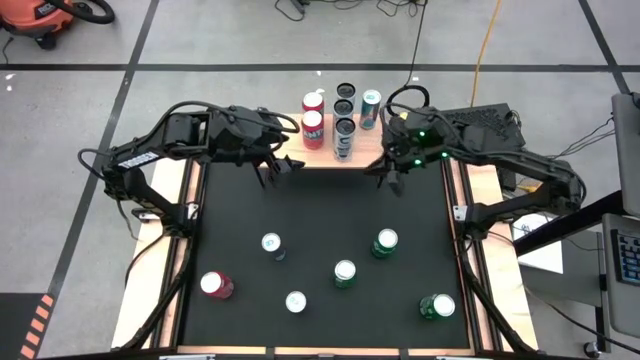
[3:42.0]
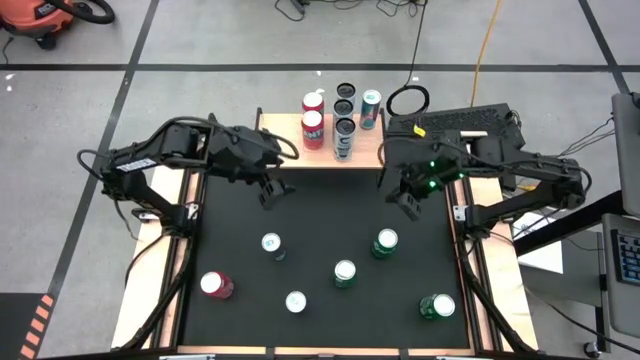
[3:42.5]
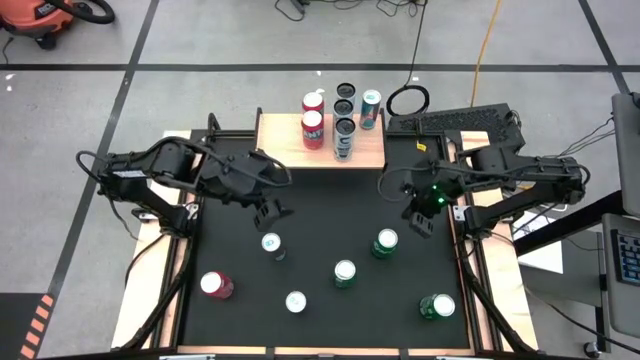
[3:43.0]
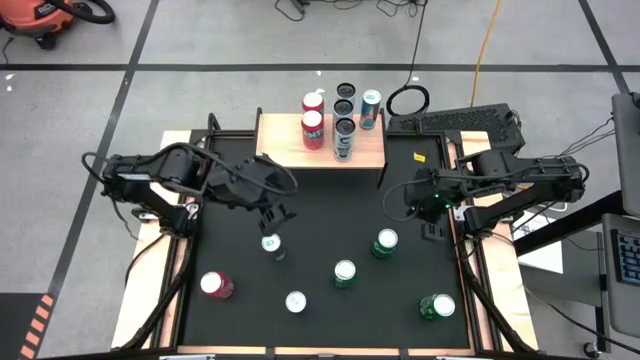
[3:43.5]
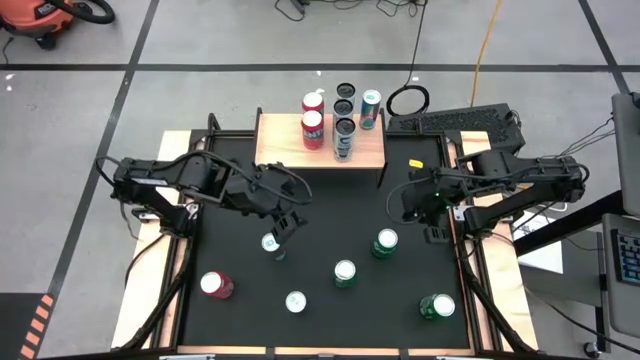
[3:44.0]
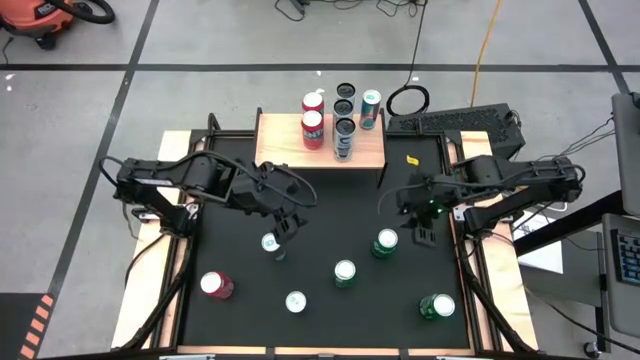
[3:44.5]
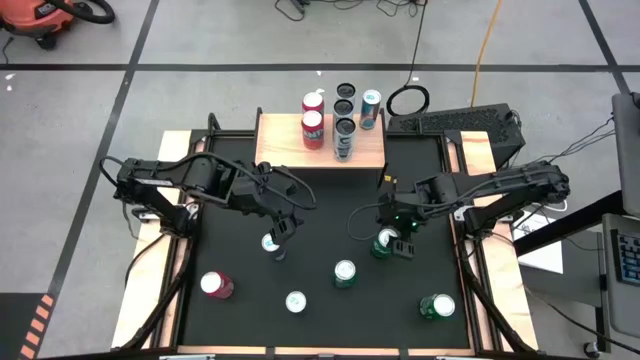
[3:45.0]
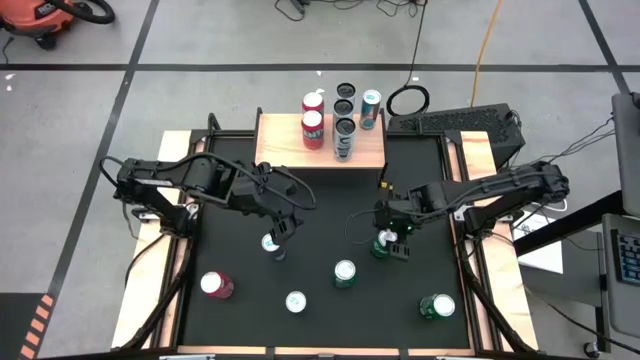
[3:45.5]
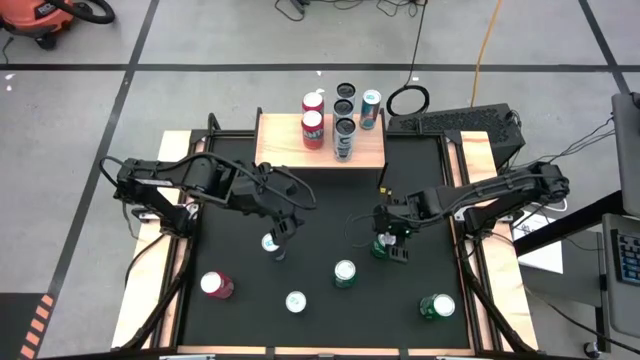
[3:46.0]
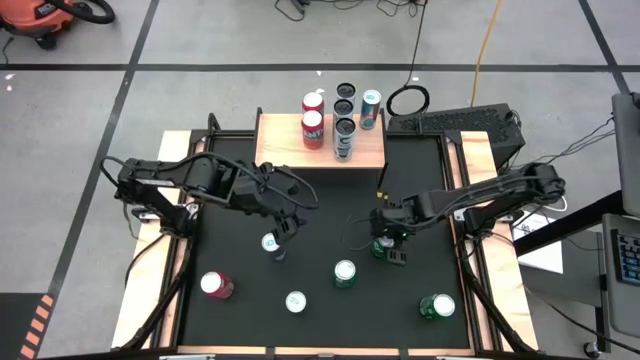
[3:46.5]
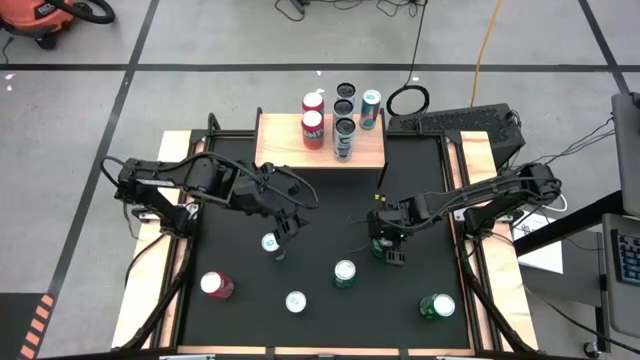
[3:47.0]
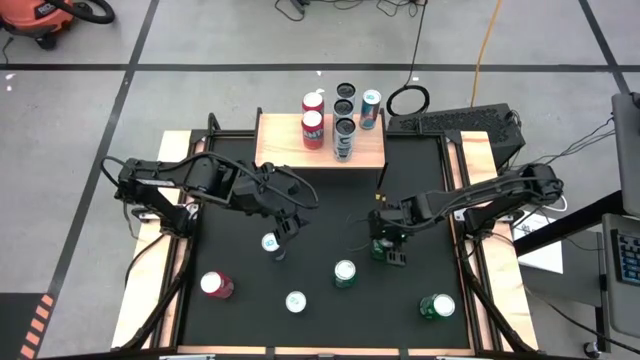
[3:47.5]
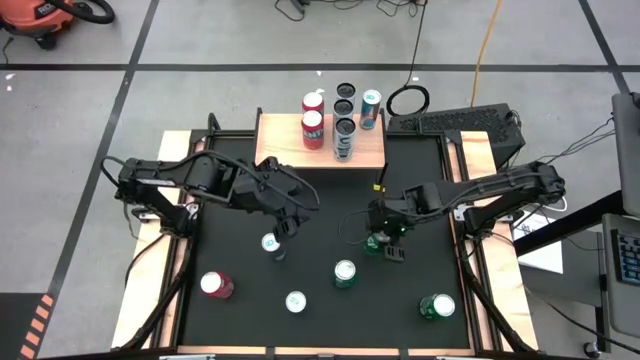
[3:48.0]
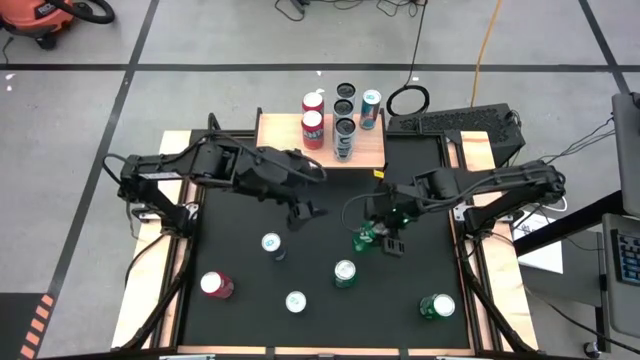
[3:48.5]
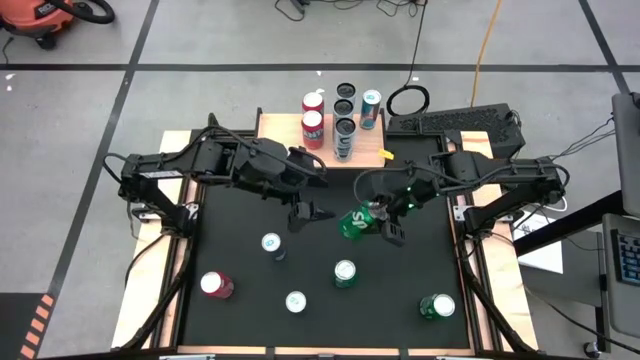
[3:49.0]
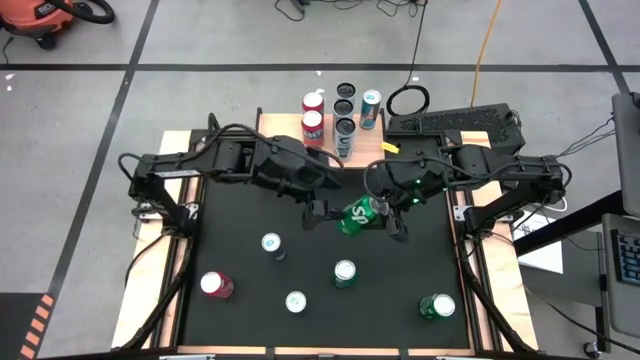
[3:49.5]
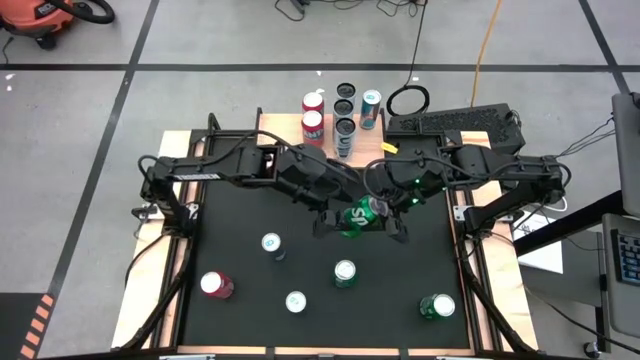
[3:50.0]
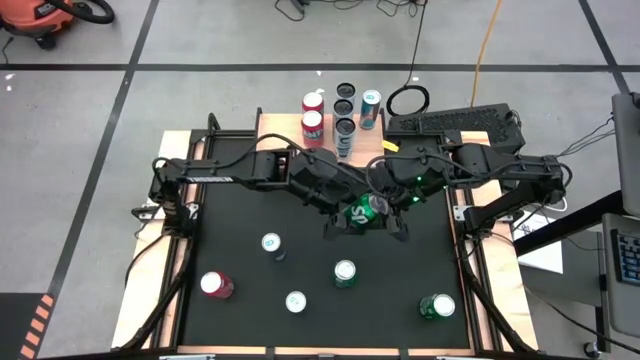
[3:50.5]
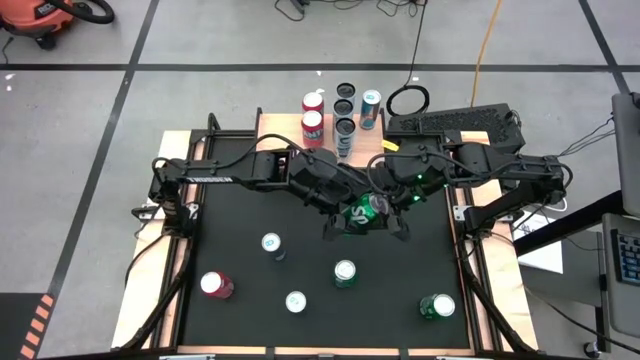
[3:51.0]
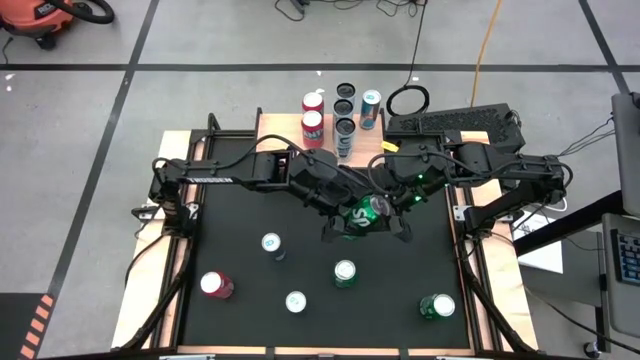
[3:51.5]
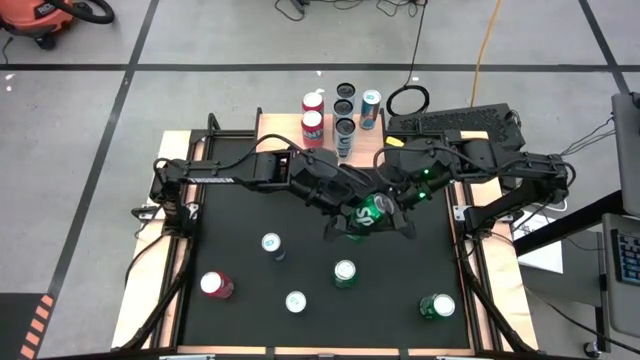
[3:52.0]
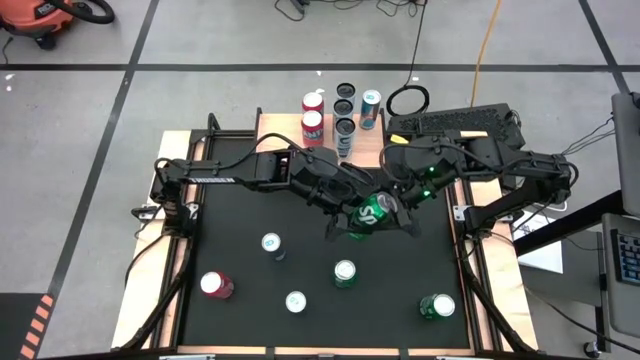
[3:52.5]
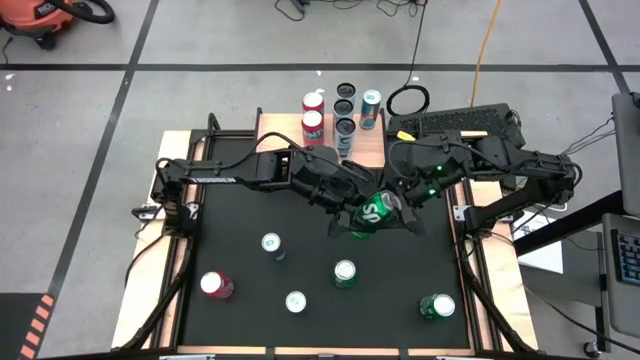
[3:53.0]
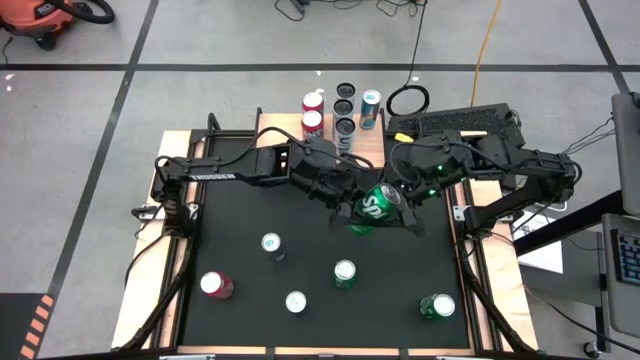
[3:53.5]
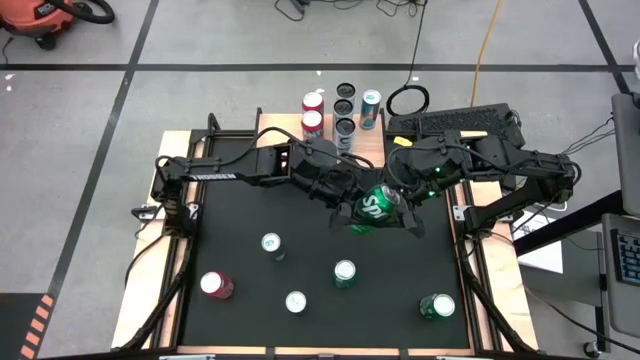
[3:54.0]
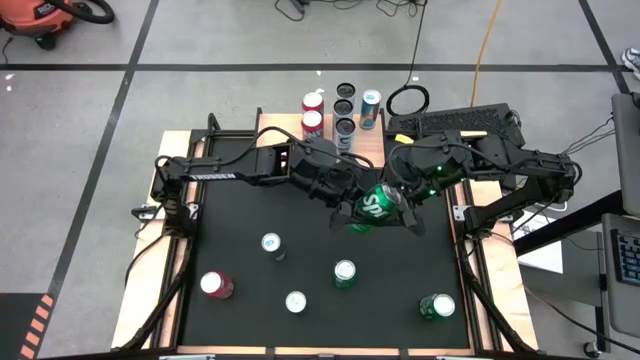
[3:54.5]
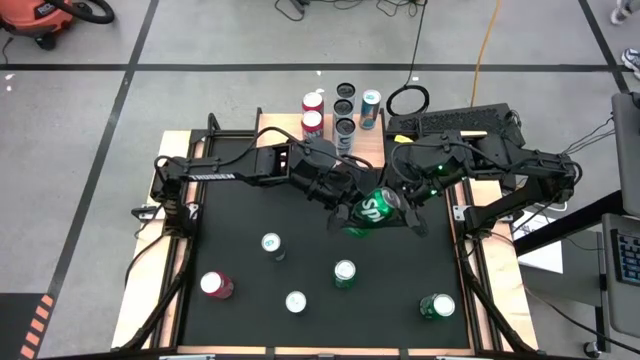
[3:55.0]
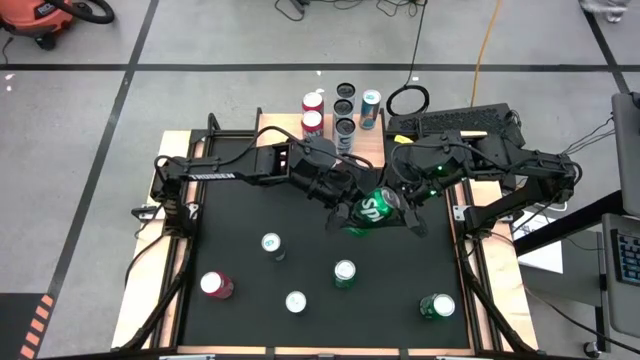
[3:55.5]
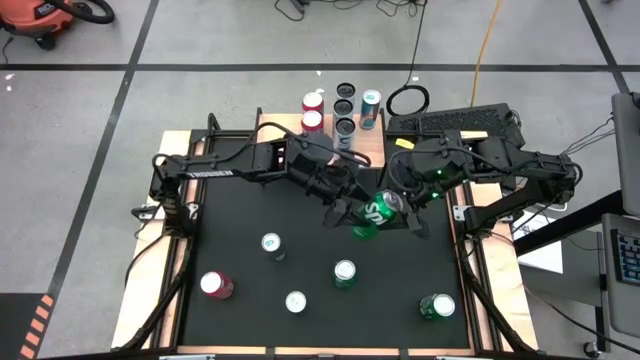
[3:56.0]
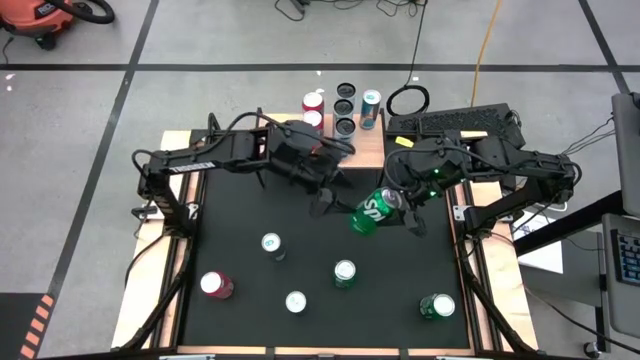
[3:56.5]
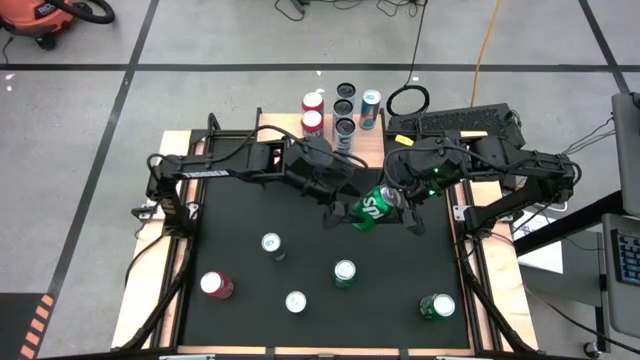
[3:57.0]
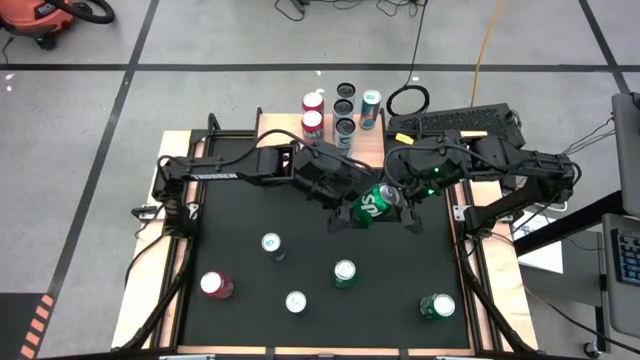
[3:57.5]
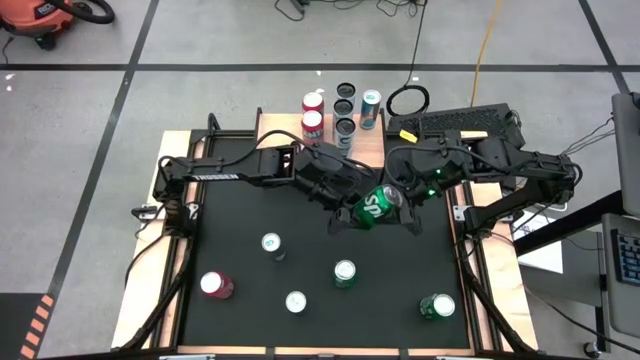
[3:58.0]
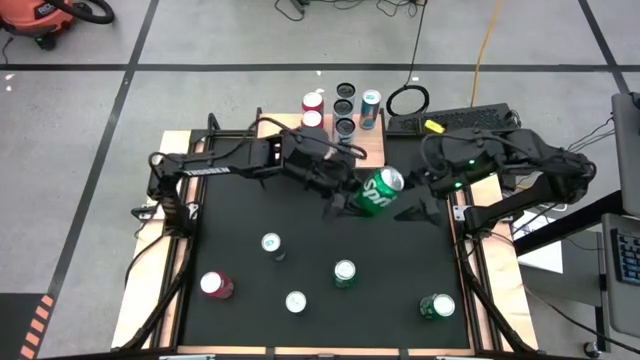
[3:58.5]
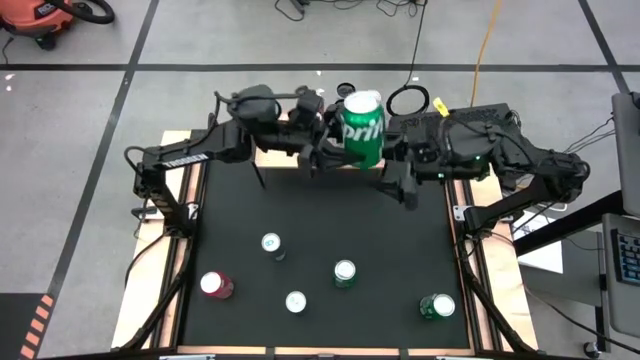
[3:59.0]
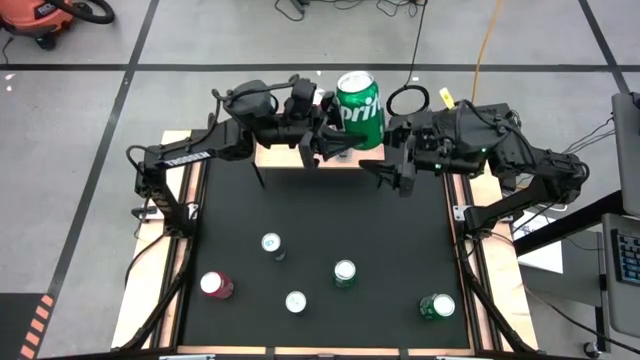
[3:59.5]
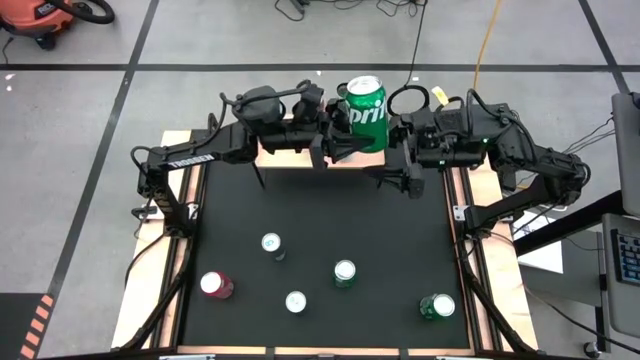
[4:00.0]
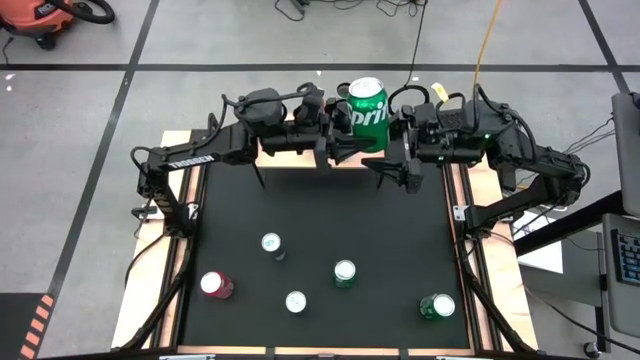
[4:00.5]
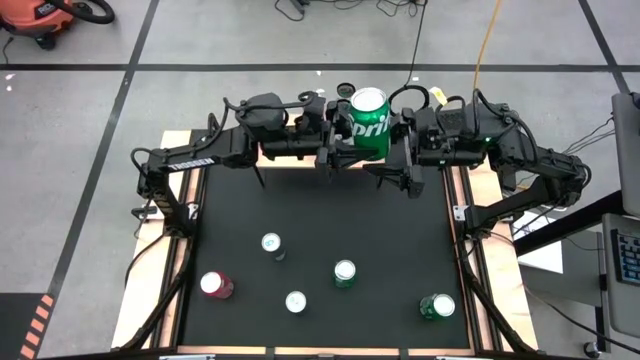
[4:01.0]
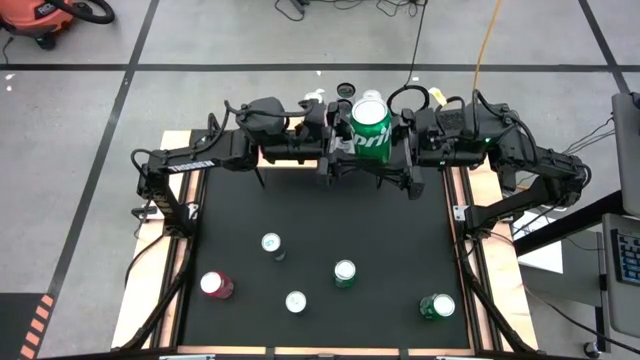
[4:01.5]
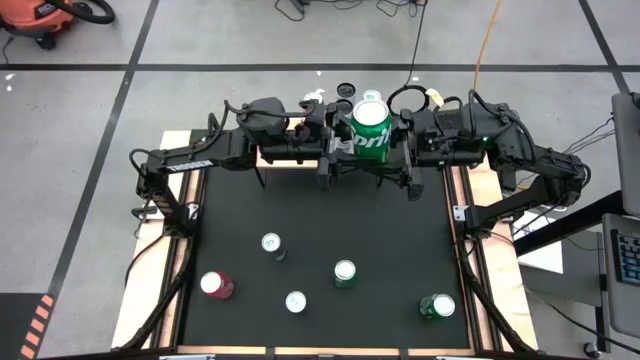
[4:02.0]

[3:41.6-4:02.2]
Task: Place canned beverage on shelf
Put the top center green soda can on the shelf

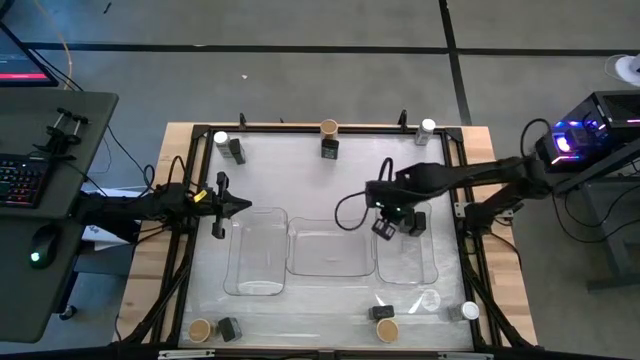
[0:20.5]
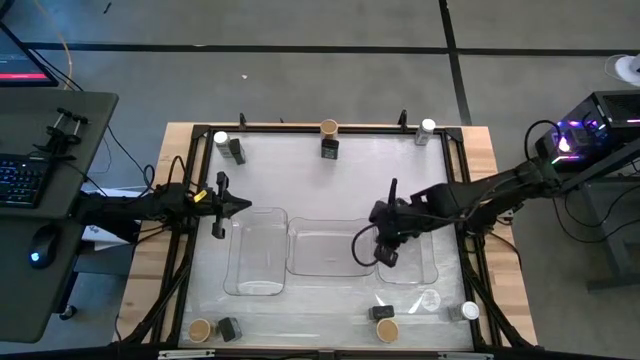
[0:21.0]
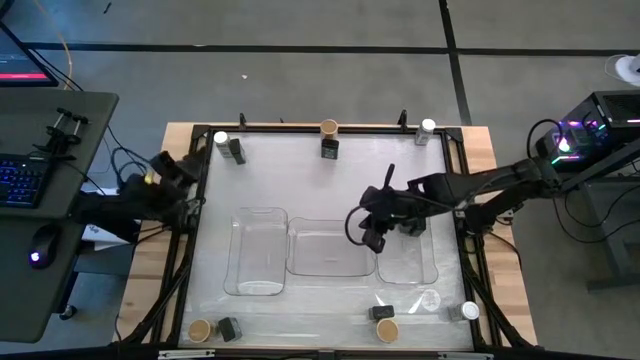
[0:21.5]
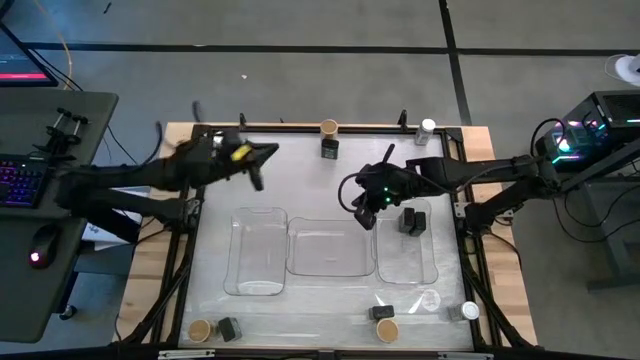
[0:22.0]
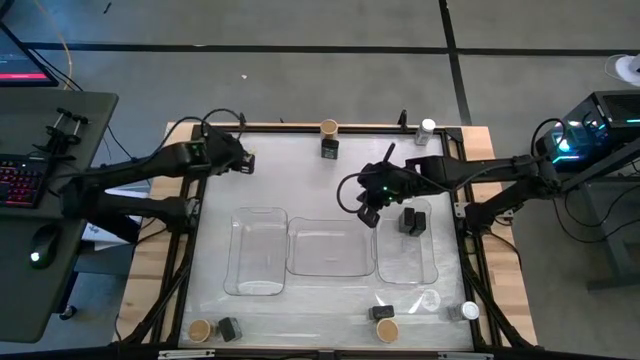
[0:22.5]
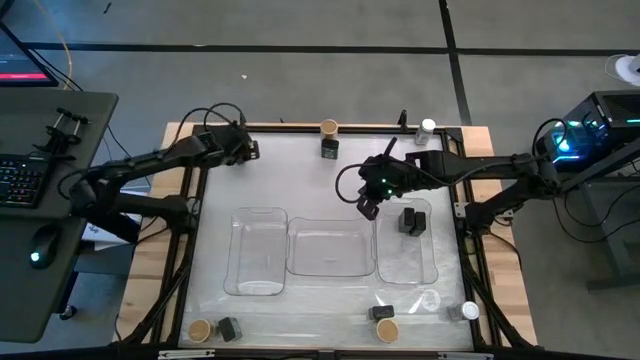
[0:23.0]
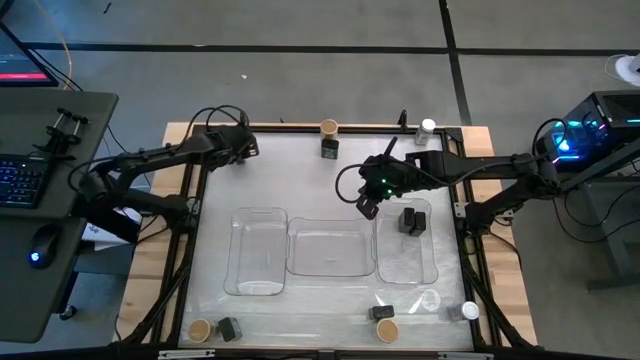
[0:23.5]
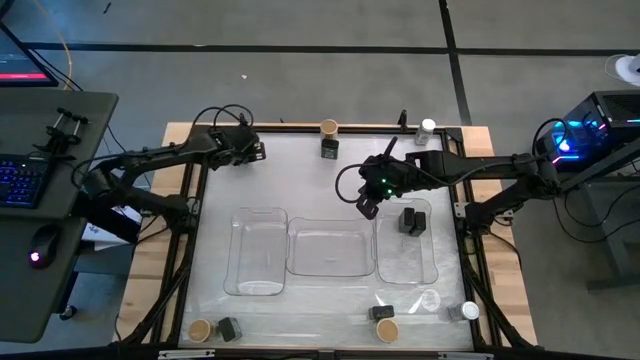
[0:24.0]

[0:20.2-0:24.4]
Task: Sort spices by type
Put the black seasoning can into the right transparent bin aligned with the other black seasoning cans
